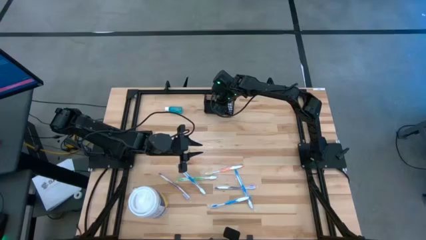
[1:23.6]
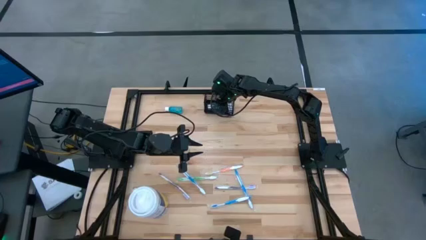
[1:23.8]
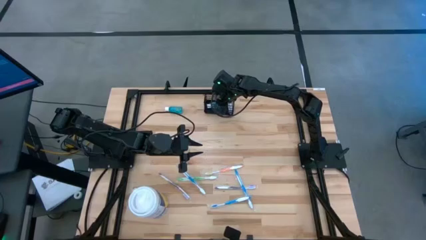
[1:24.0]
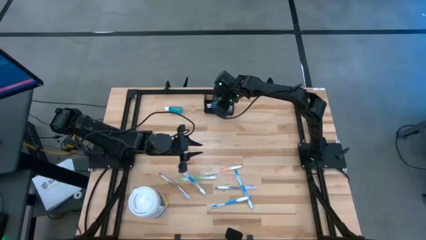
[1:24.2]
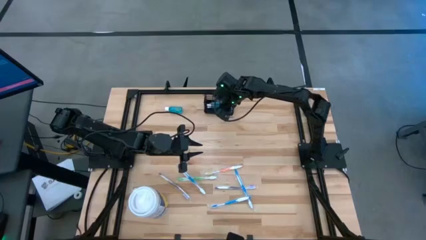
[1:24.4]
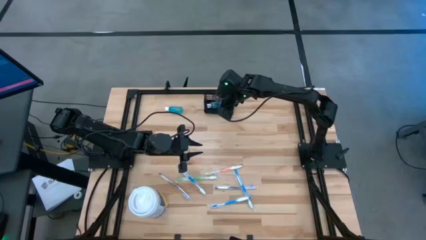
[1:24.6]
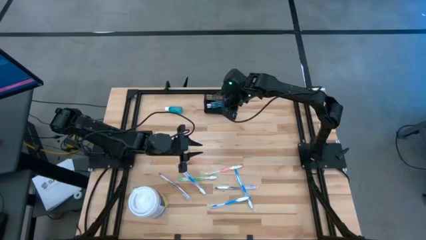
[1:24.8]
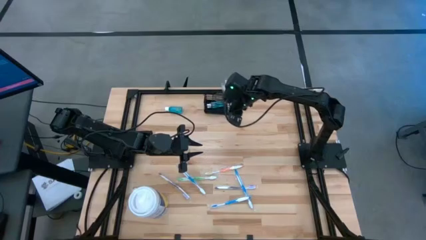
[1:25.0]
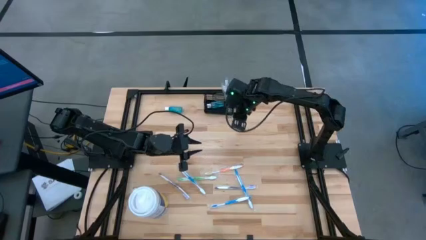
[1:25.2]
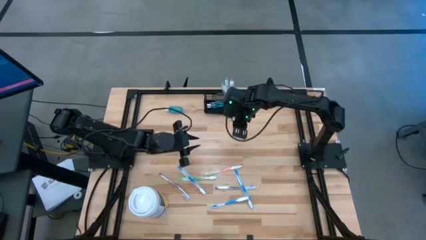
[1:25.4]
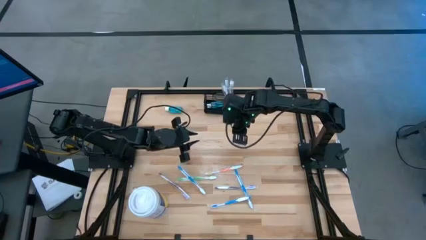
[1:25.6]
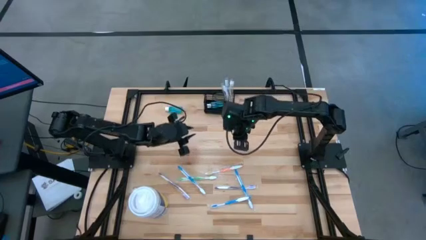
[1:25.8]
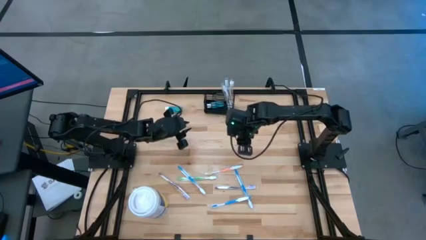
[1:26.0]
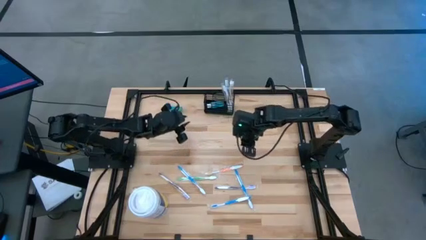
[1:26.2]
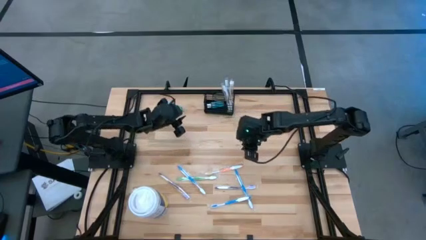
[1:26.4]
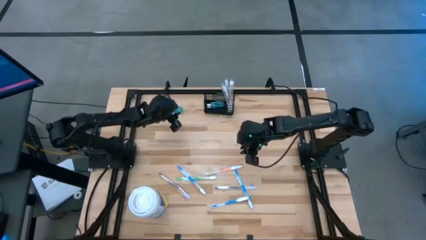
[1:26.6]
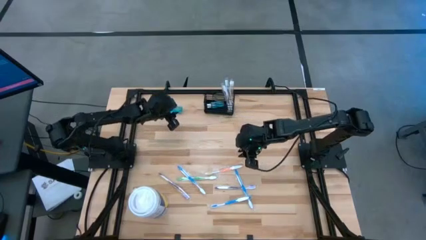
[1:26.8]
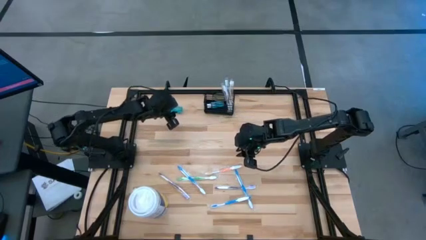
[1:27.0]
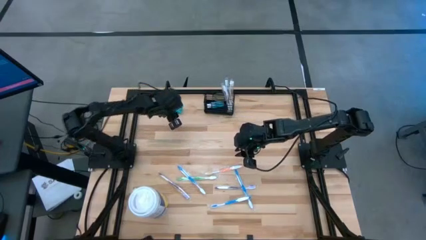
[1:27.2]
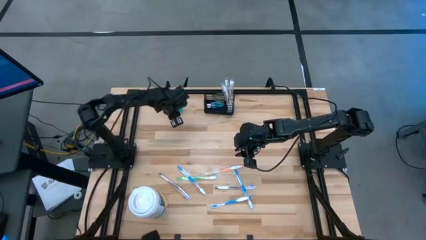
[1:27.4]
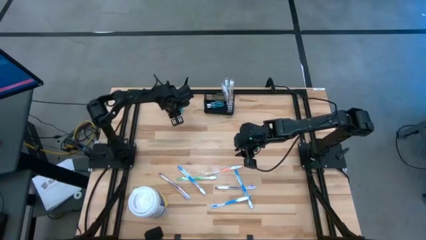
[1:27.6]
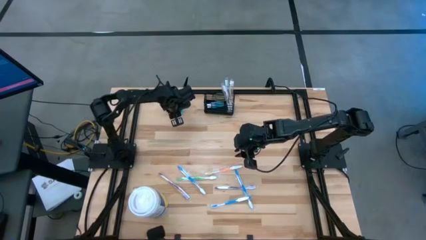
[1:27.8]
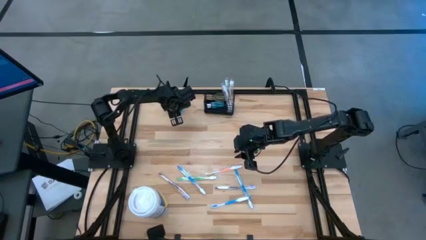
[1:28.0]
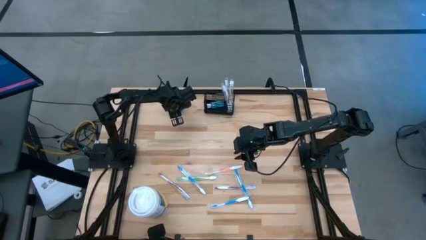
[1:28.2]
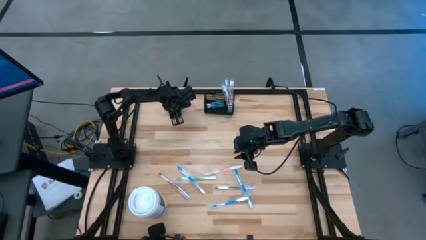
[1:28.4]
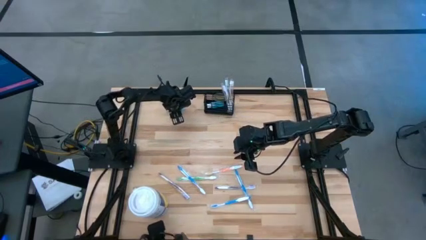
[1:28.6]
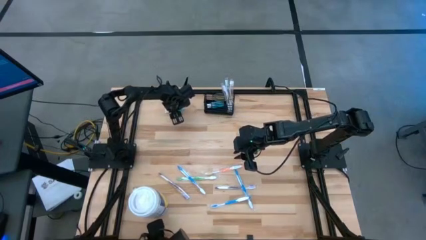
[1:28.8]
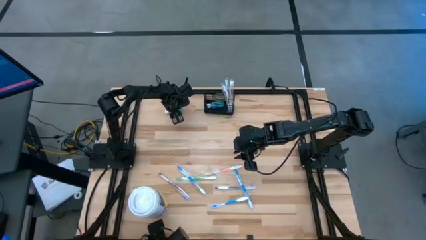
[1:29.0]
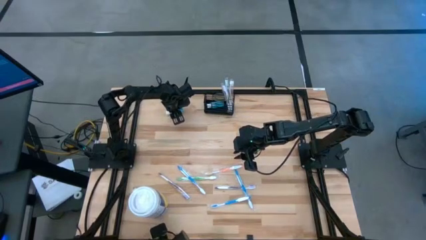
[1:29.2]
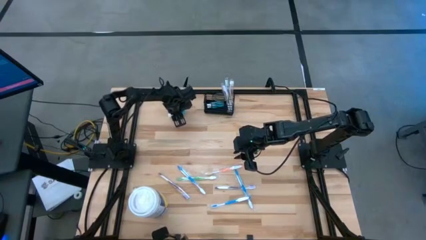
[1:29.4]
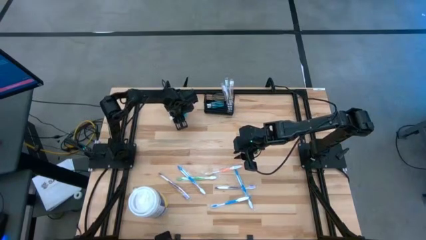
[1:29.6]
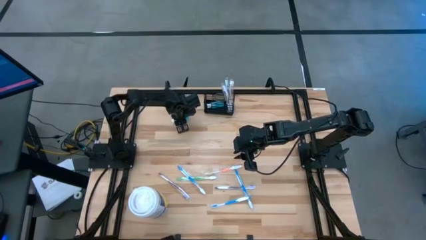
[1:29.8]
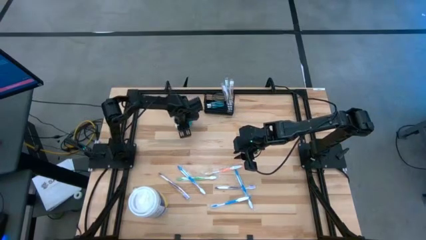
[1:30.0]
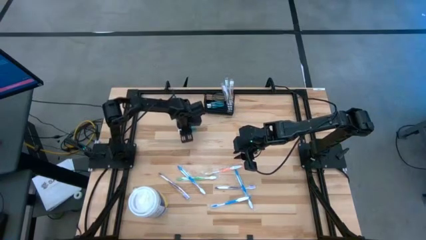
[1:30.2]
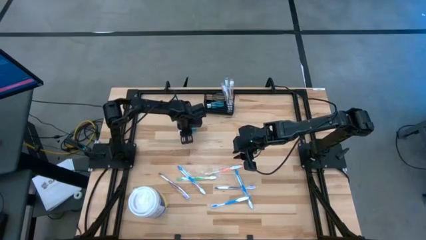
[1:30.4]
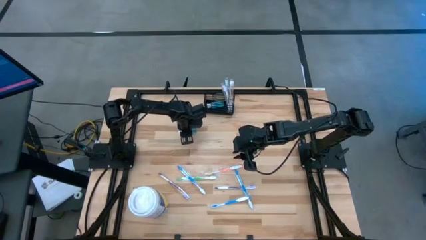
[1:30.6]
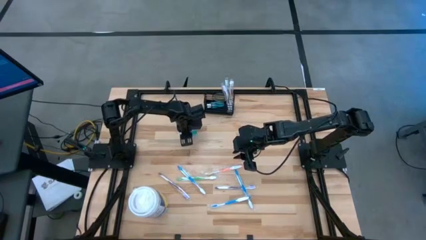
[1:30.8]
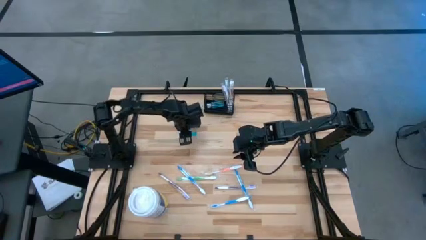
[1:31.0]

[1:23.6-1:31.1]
Task: Pick & Place toothbrushing station
Put the blue mouthwash into the mesh organizer

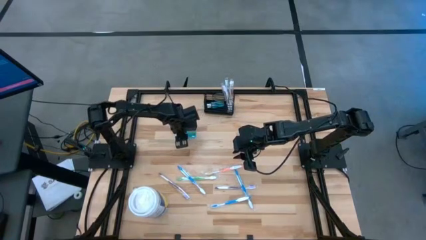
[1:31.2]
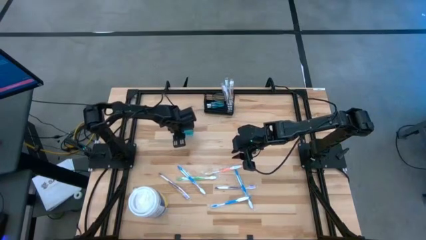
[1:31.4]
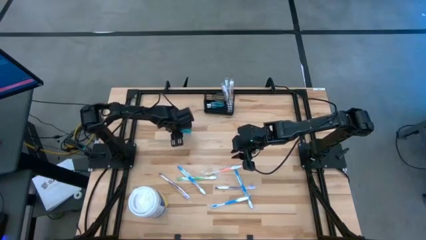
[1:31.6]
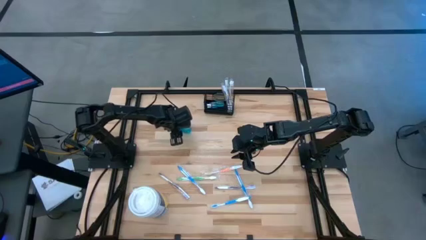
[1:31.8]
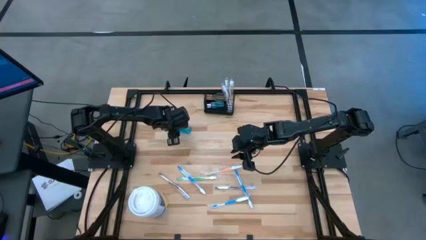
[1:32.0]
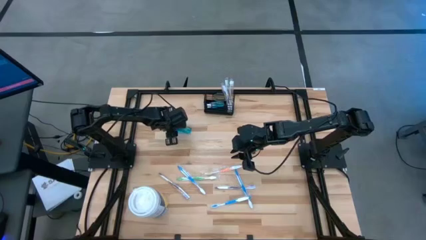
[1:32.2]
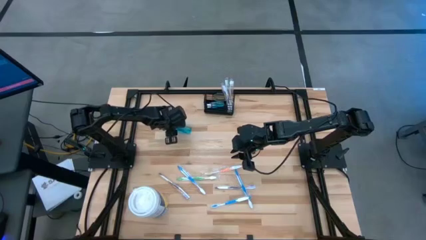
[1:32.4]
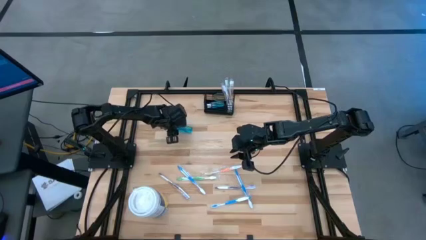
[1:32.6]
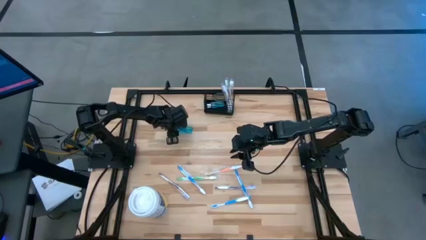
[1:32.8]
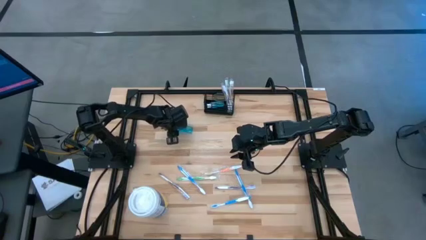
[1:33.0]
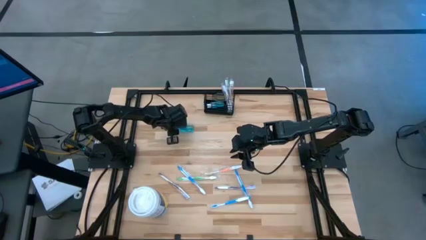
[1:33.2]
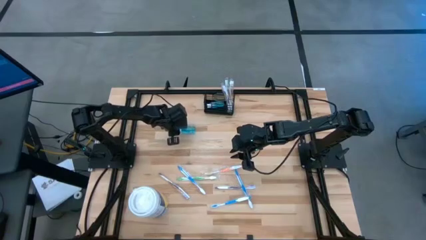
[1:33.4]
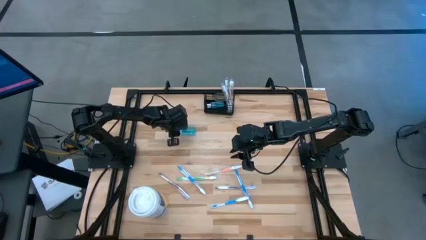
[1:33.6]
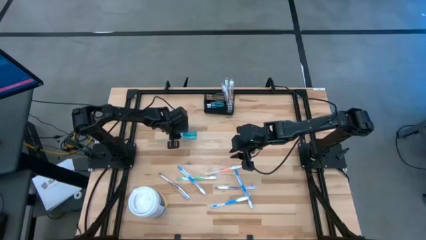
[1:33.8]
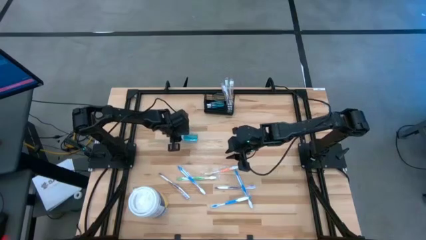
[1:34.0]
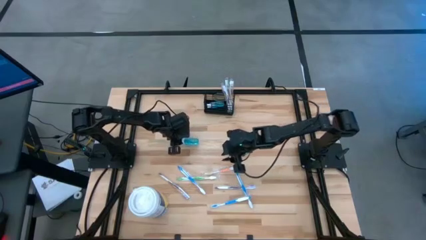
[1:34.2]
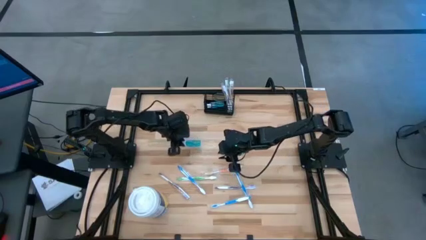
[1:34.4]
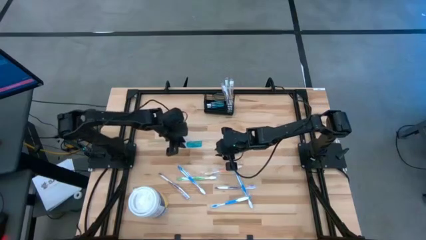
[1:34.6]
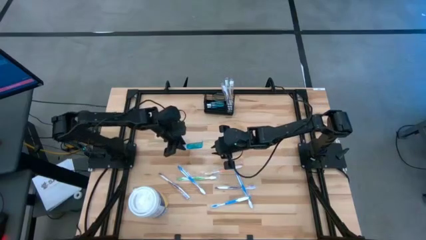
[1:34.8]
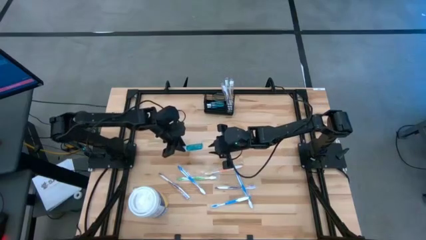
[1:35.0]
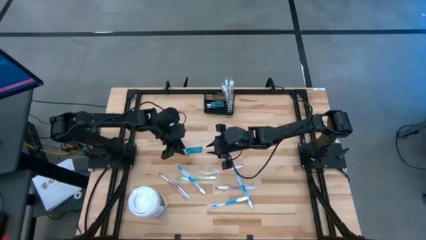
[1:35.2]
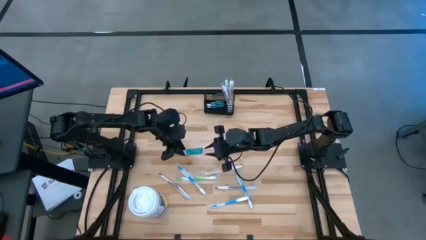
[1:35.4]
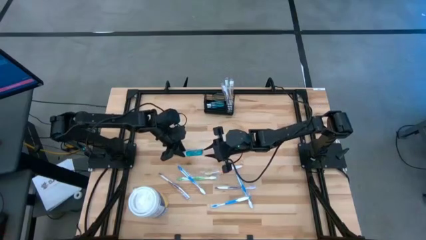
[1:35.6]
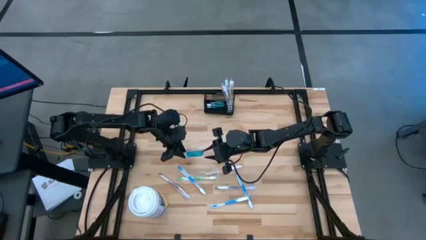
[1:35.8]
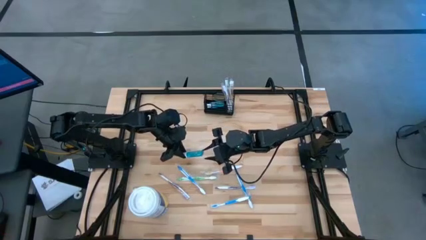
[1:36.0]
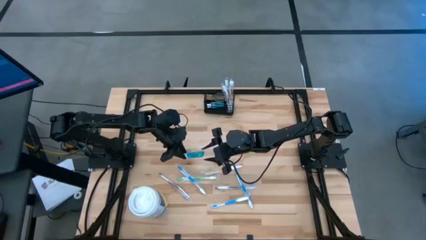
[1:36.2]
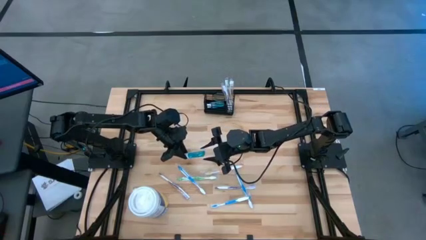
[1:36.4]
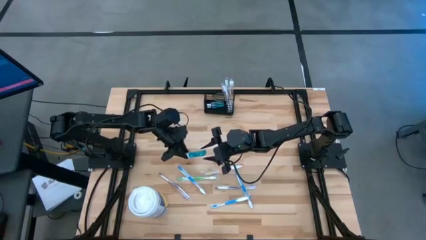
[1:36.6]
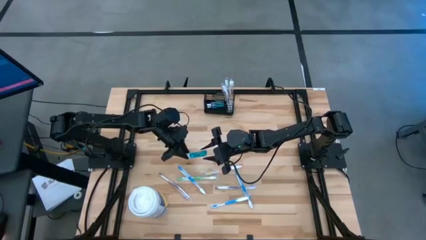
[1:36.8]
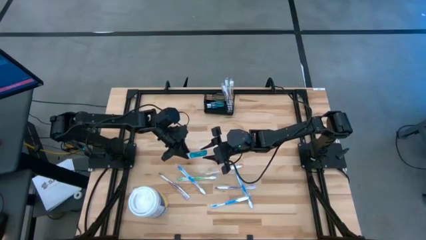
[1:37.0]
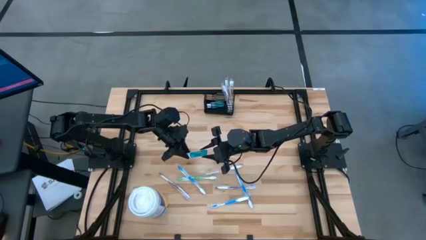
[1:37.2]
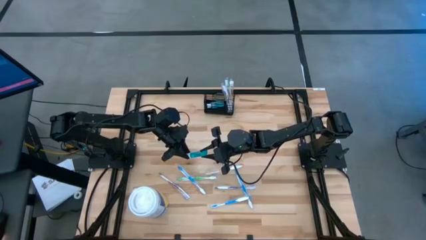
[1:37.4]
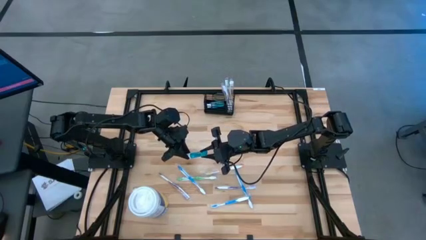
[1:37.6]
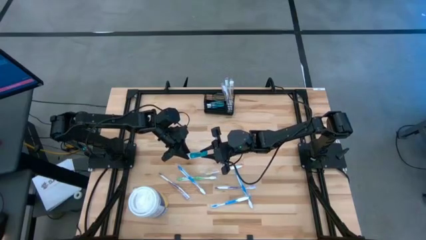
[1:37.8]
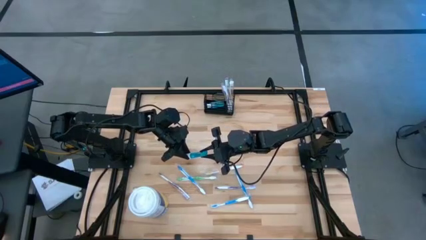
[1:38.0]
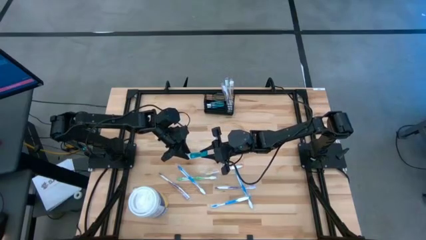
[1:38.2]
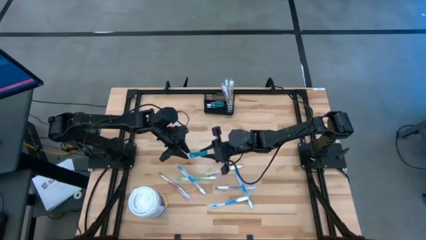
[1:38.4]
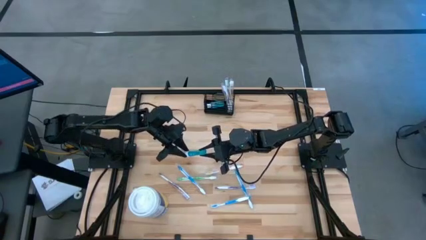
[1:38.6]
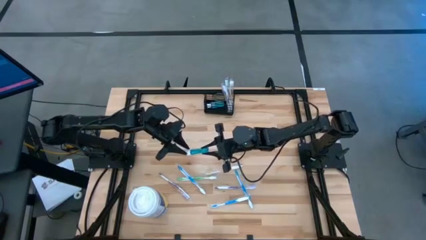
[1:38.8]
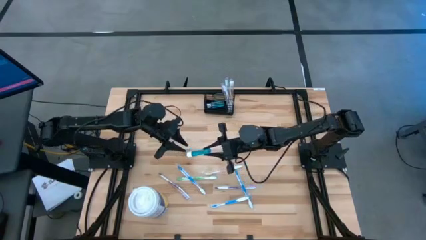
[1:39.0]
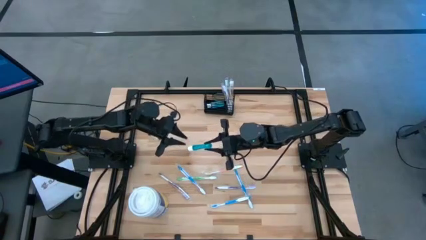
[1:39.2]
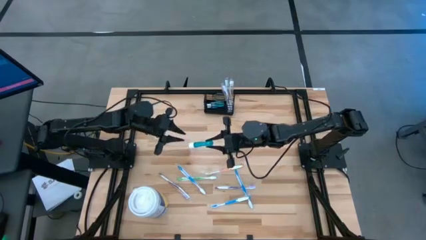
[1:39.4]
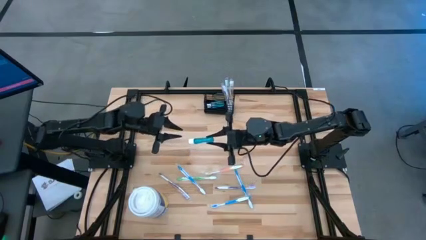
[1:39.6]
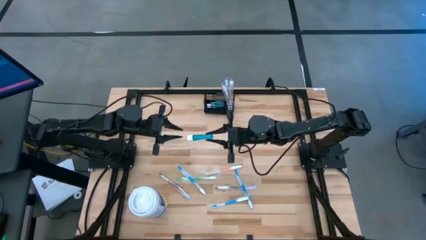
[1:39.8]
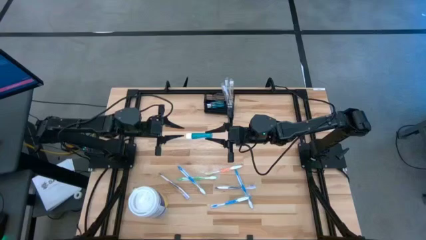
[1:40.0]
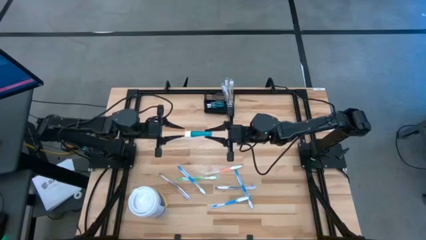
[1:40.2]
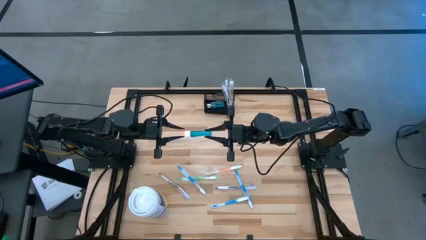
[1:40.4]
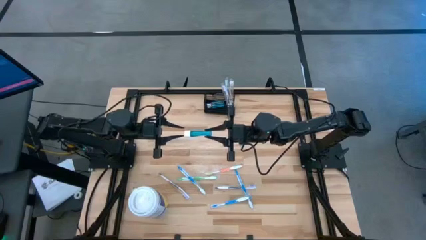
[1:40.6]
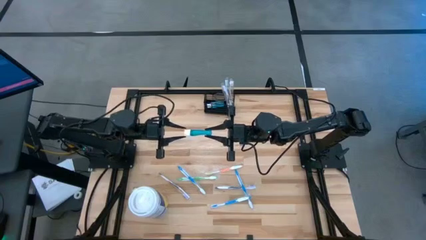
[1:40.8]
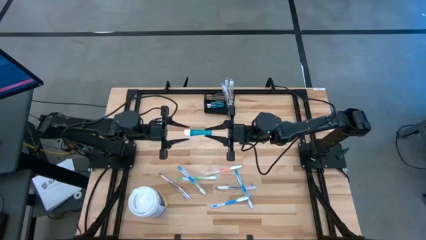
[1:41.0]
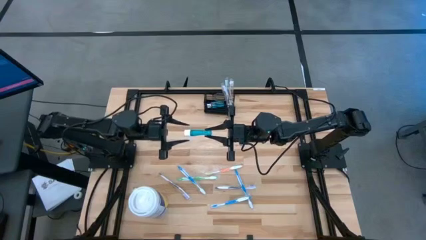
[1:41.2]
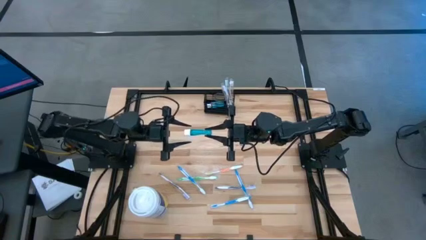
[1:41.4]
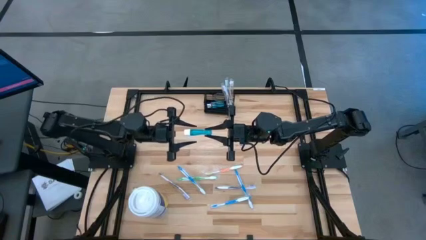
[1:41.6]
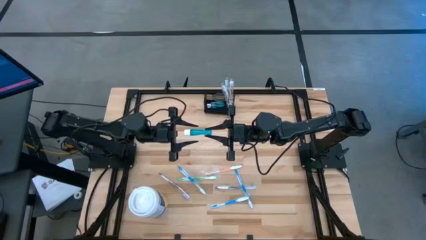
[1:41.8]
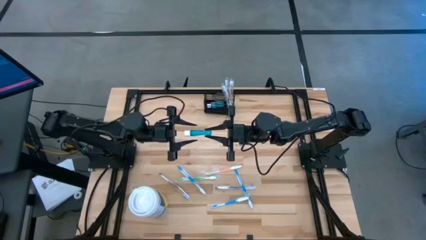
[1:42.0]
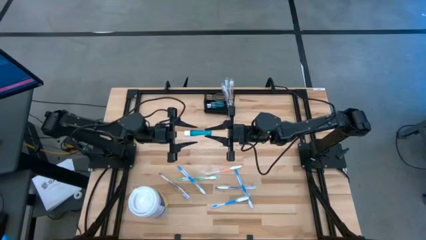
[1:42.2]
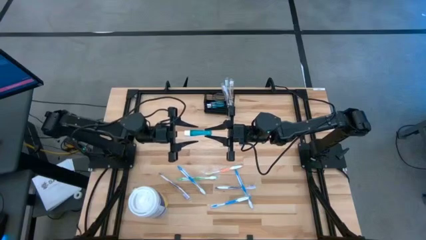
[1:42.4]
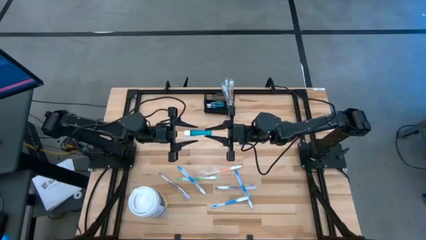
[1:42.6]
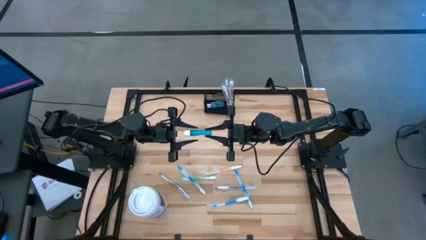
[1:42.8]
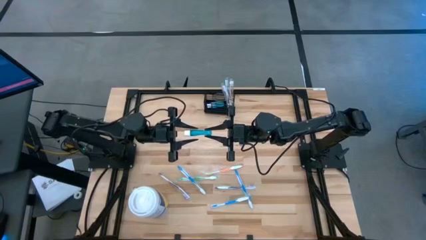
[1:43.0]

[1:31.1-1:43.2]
Put the blue mouthwash into the mesh organizer
